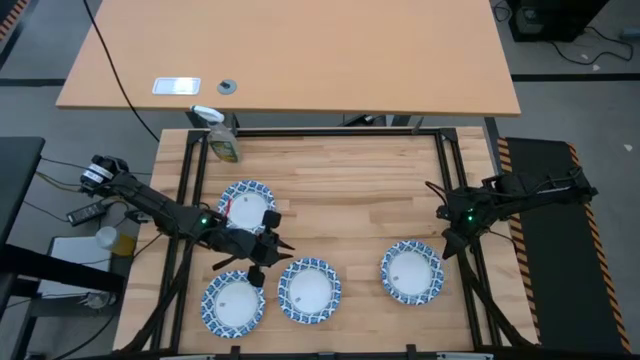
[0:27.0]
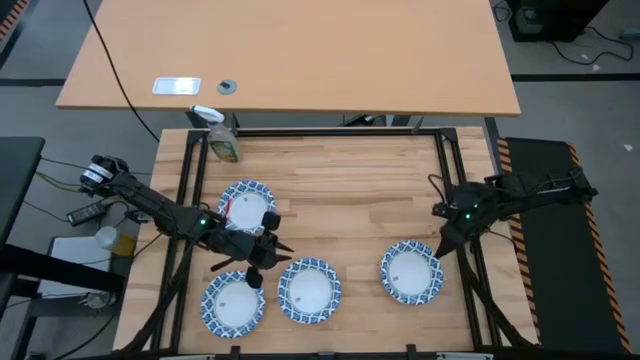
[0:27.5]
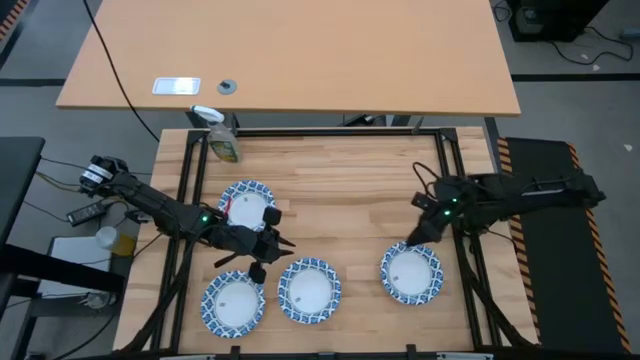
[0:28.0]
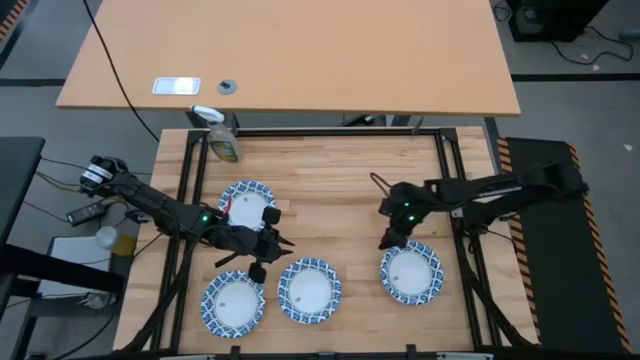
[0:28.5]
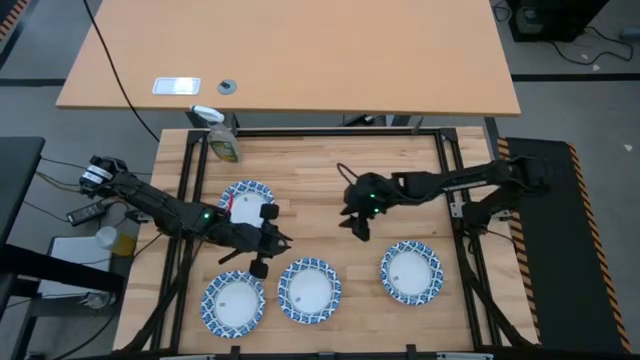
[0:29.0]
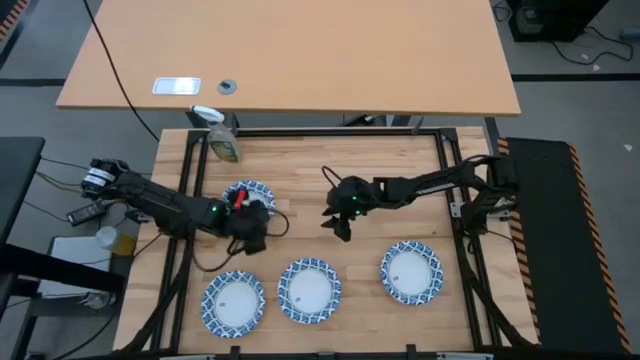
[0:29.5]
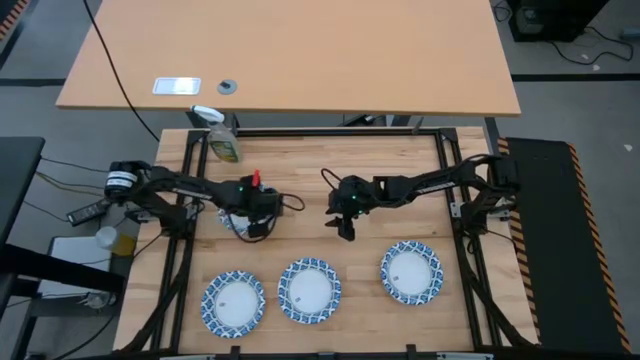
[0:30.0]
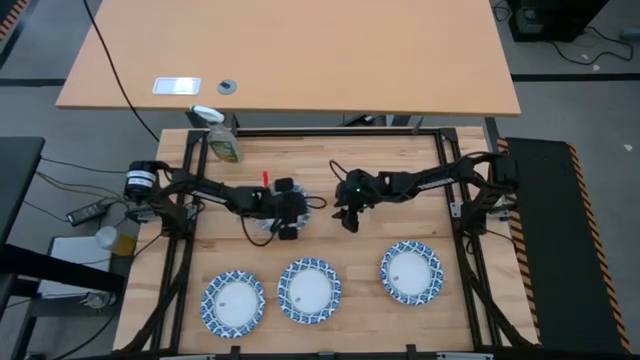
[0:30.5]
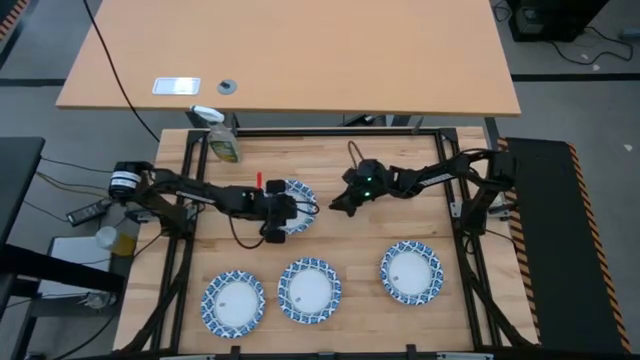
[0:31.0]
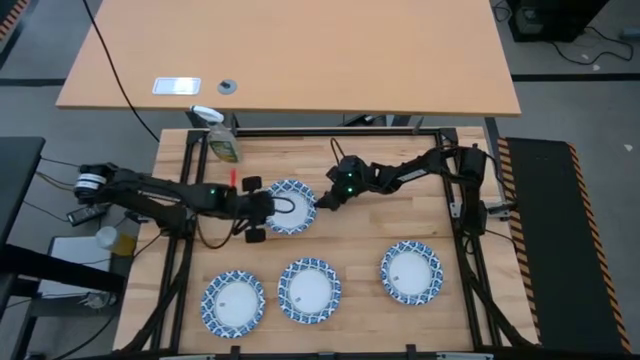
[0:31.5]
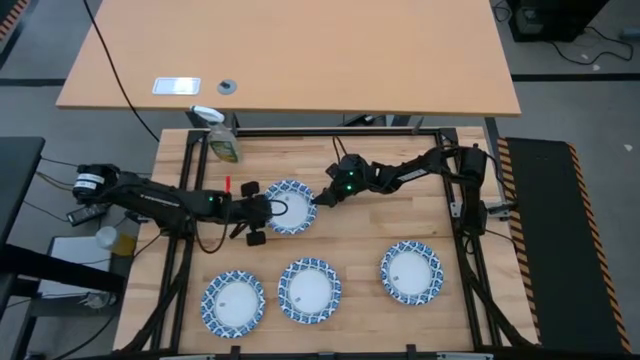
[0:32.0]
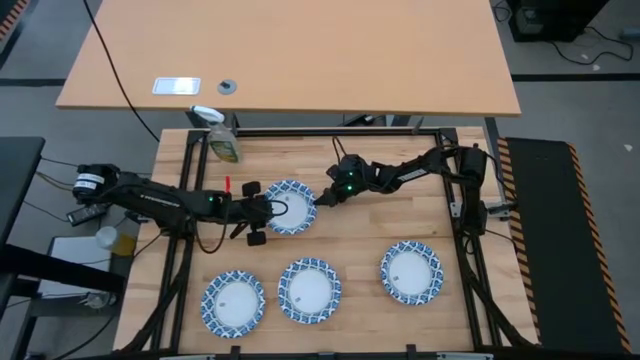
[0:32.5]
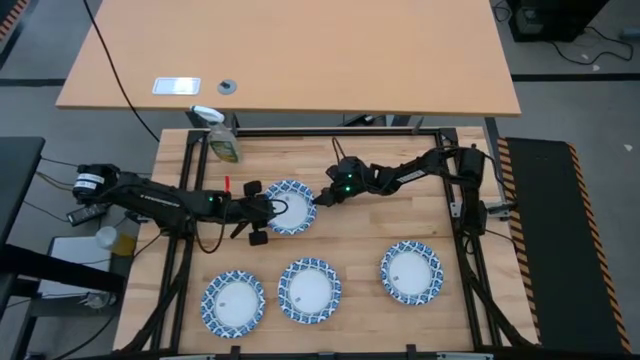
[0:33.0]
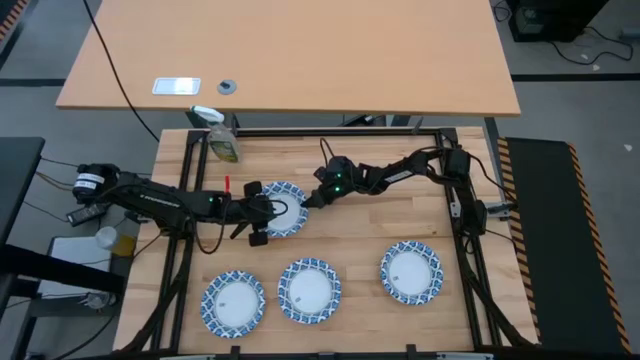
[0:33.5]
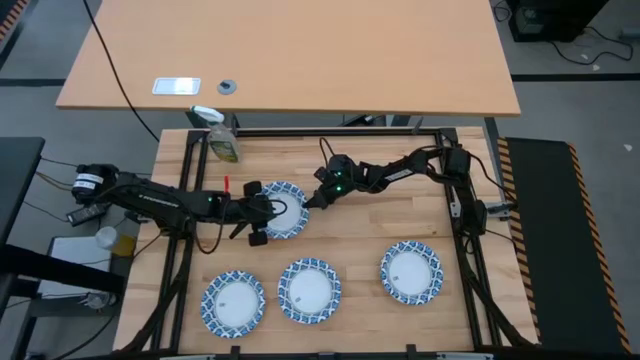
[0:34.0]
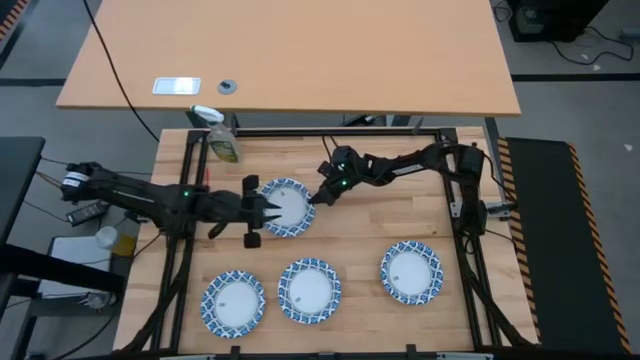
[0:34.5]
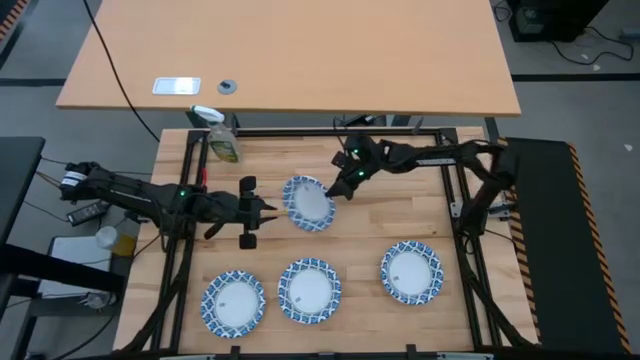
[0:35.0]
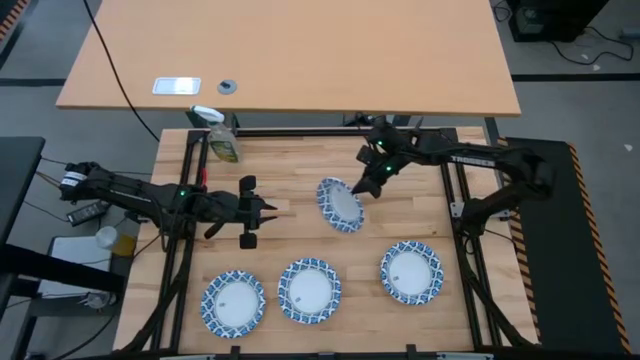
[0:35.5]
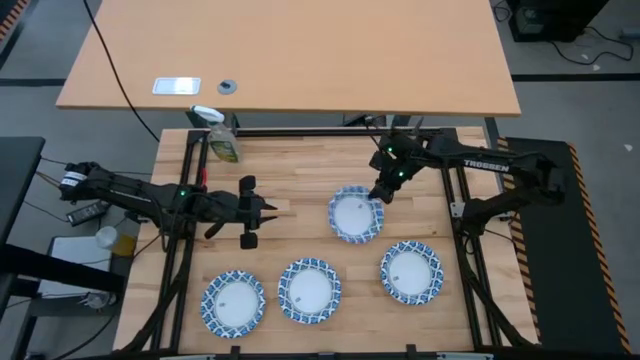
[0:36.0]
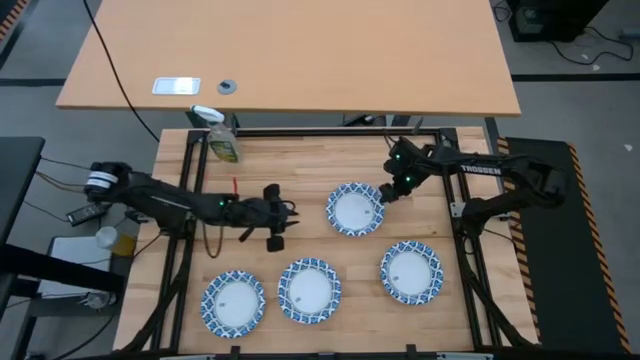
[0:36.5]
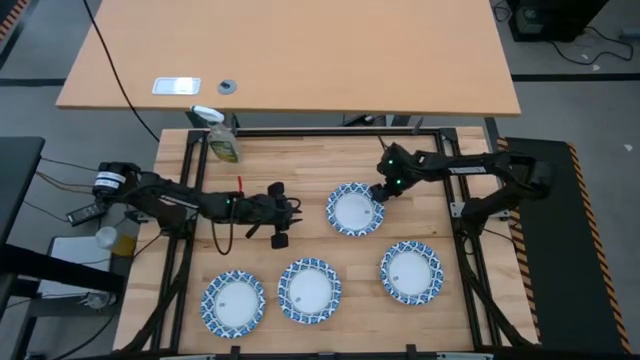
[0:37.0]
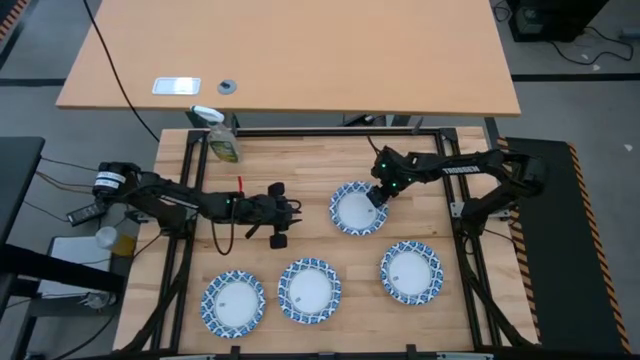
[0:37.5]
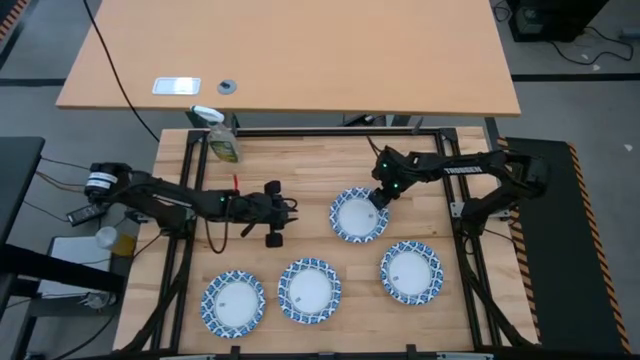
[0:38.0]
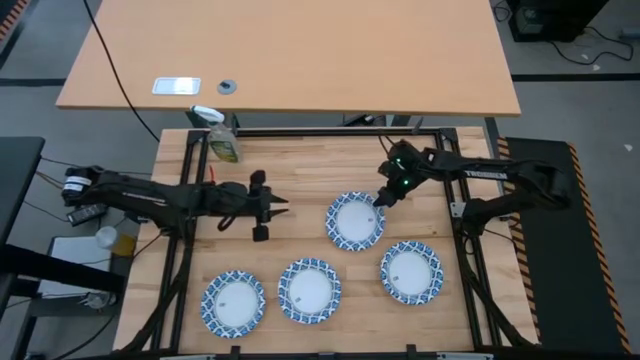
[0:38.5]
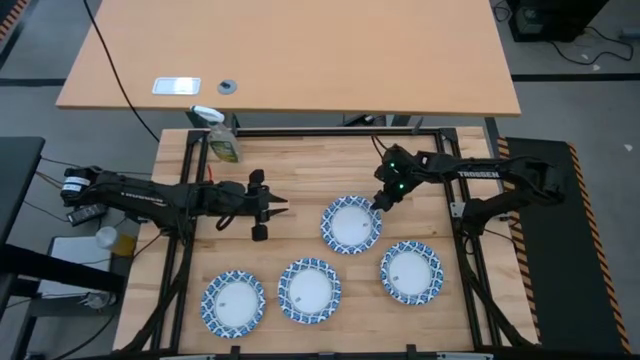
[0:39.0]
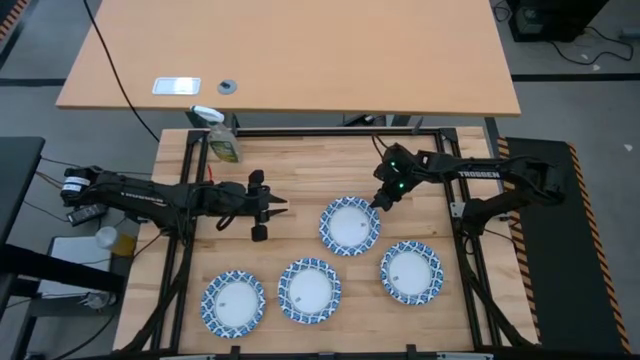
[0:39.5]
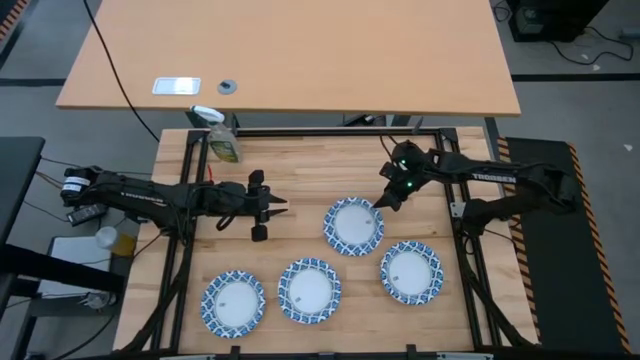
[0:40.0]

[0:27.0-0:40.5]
Stack the white bowl on top of the stacked white bowl

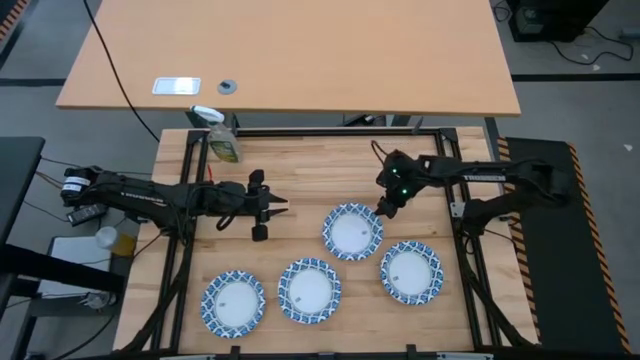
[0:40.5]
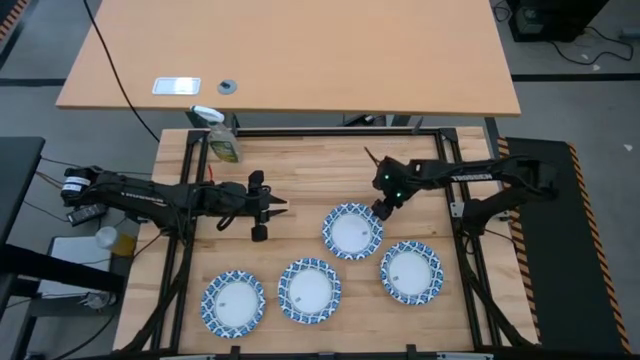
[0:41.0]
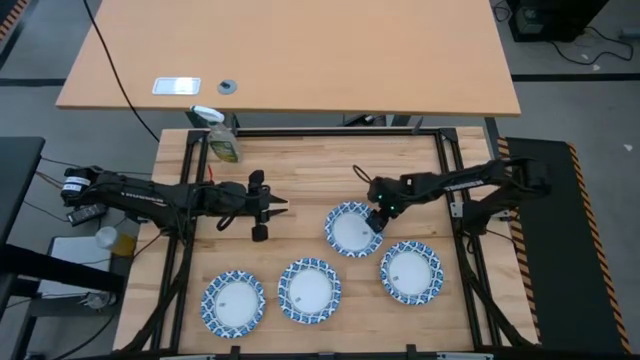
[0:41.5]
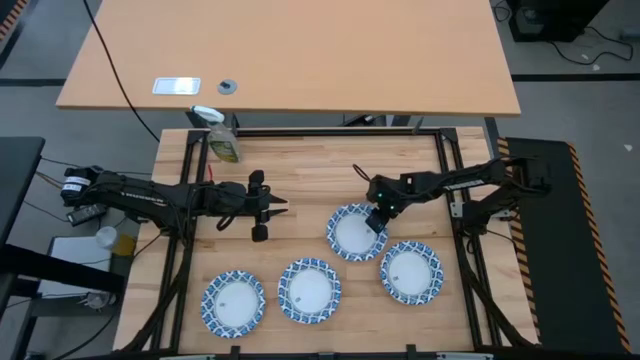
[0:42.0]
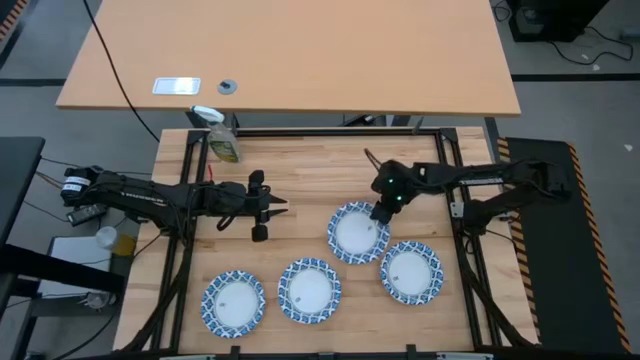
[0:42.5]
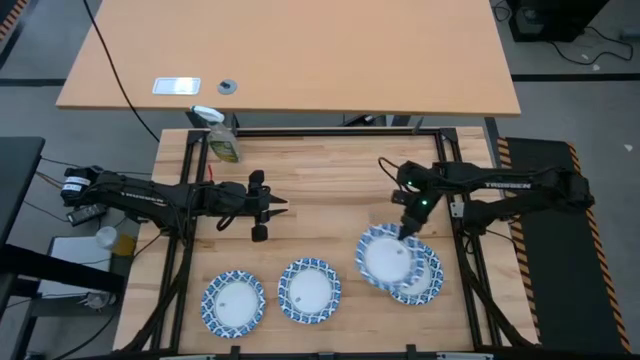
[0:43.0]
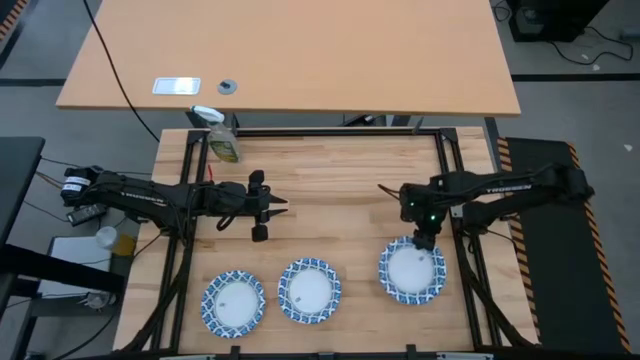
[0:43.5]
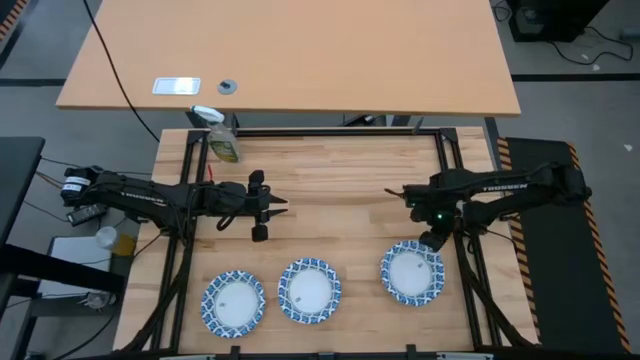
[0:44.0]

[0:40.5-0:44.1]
Stack the white bowl on top of the stacked white bowl

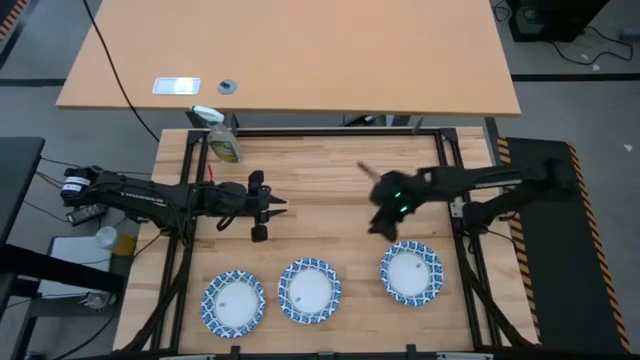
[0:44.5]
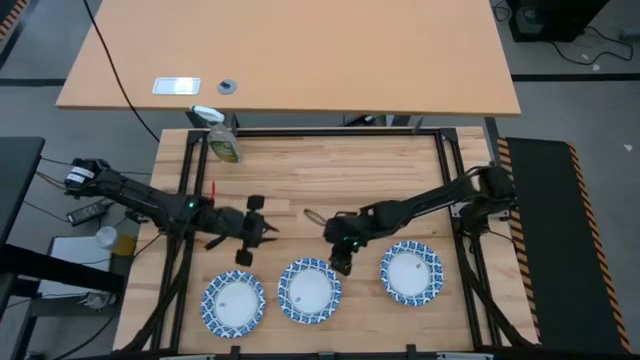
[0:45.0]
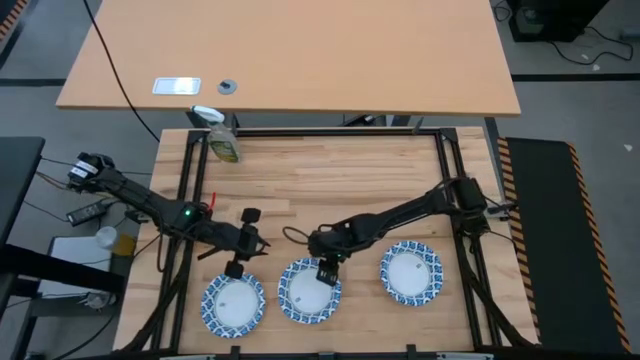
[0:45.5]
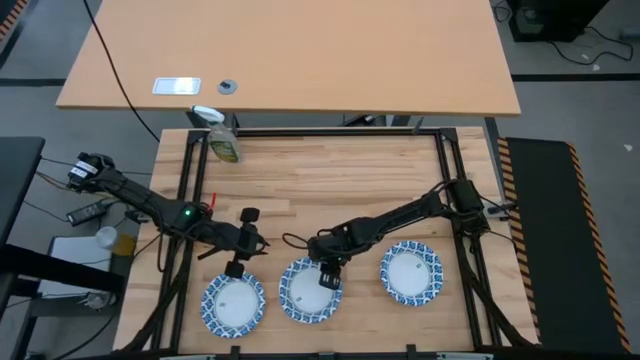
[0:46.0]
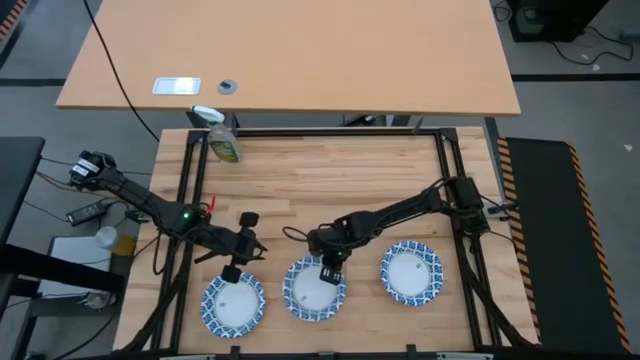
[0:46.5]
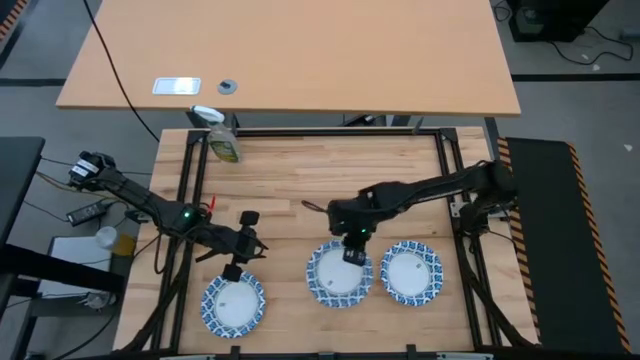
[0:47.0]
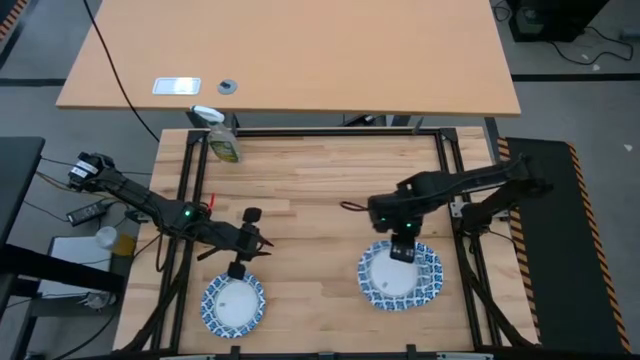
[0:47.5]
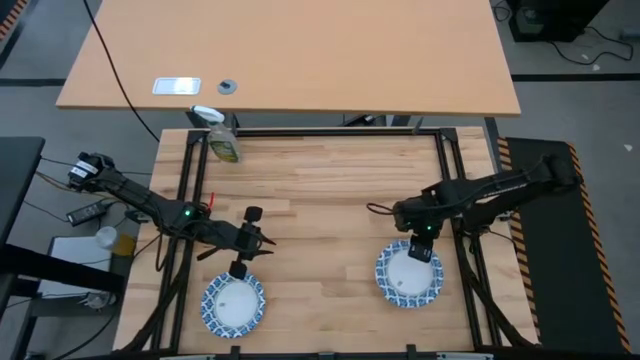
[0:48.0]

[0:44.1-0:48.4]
Stack the white bowl on top of the stacked white bowl
